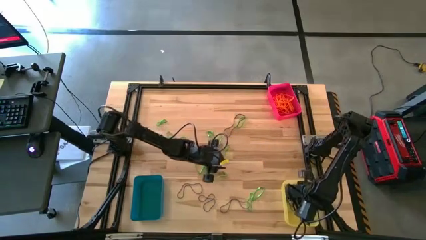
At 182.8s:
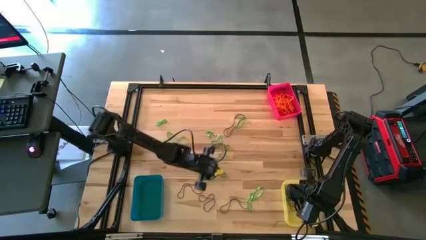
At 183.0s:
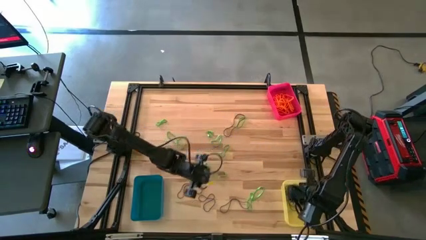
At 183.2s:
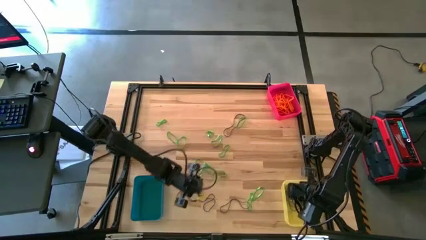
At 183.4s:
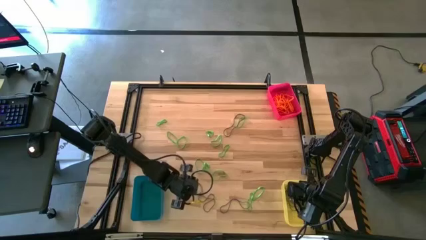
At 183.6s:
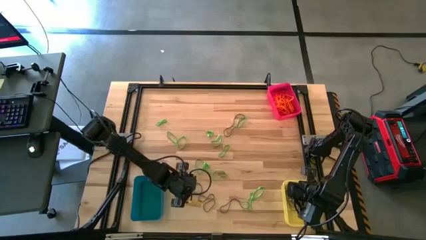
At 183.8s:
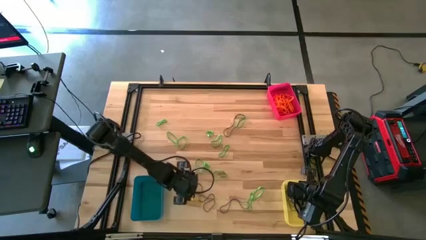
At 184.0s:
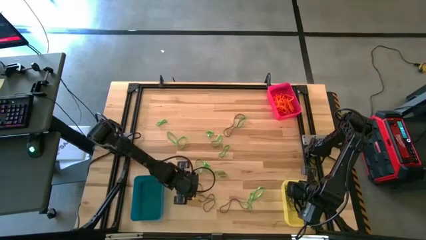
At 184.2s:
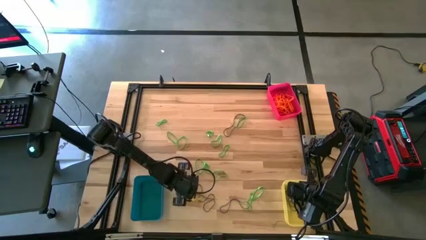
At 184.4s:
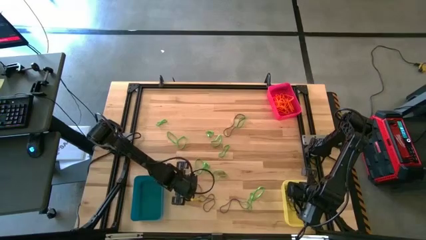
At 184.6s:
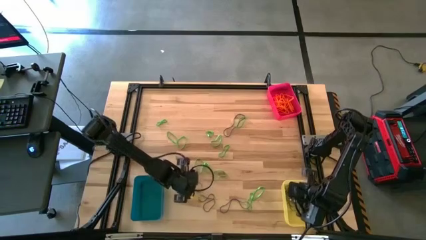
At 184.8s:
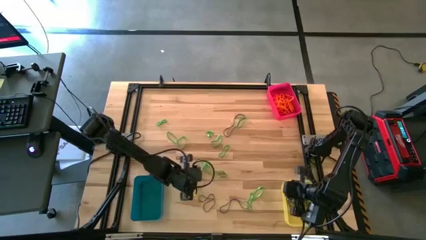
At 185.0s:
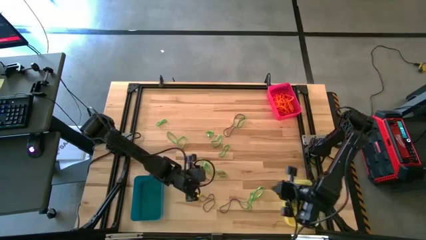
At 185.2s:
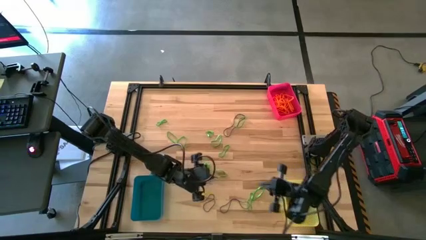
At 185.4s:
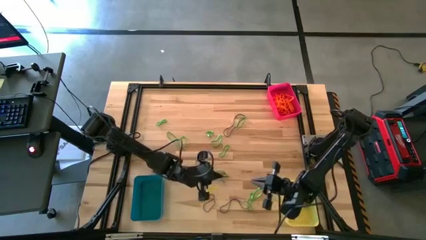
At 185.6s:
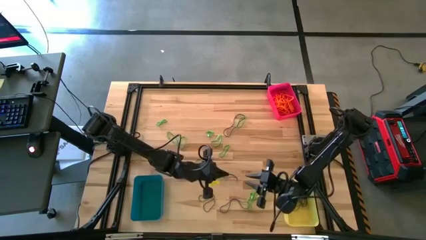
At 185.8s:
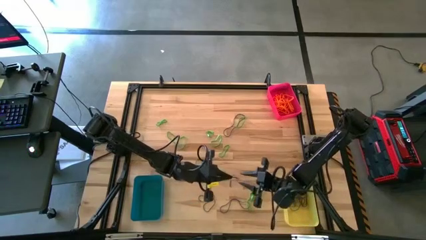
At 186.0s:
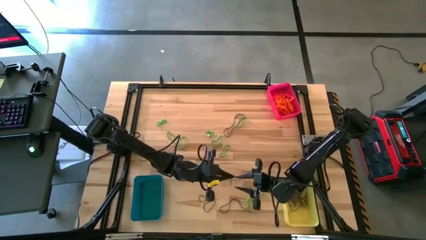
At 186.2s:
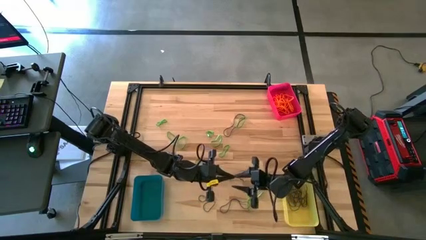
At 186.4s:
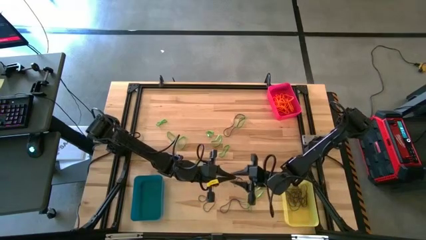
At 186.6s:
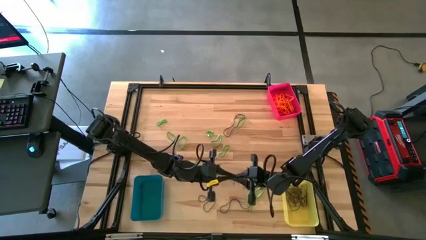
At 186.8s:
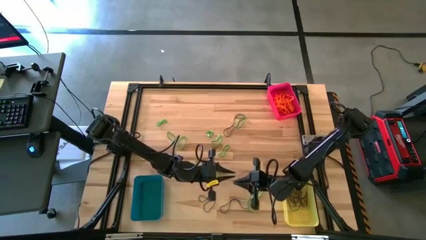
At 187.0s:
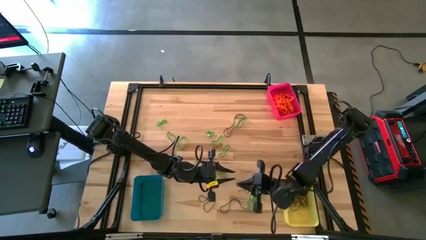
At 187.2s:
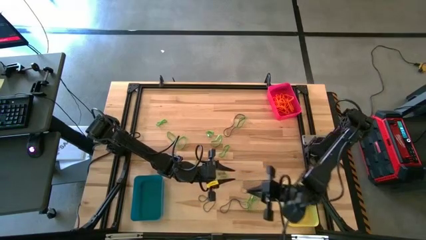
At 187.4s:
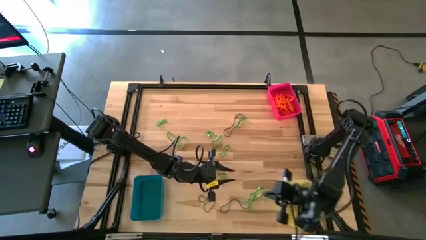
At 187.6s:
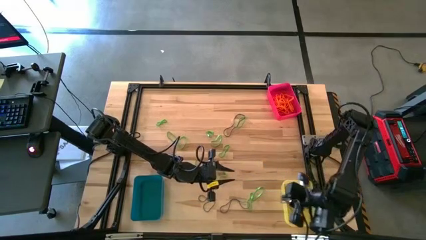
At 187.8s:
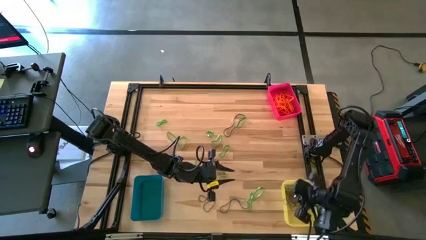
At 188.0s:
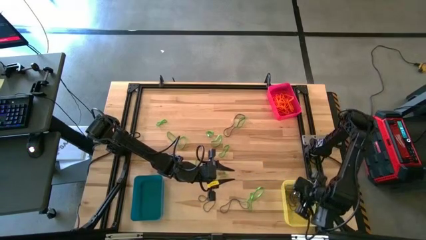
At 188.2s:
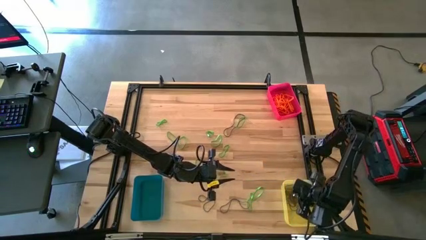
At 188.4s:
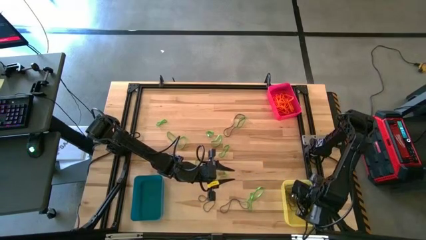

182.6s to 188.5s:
Task: Sort rubber bands into baskets
Put the purple rubber band into the yellow bin

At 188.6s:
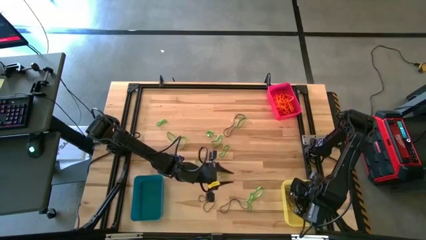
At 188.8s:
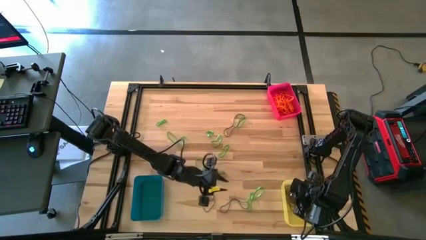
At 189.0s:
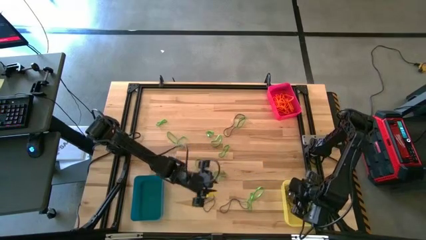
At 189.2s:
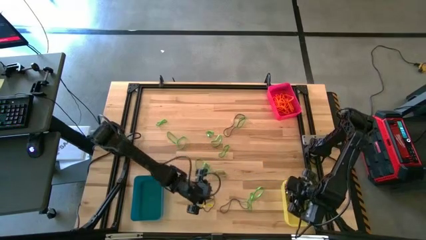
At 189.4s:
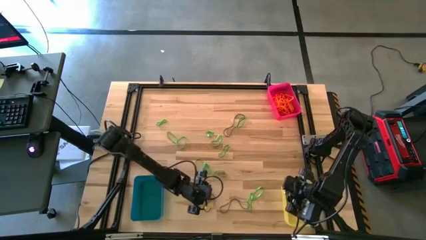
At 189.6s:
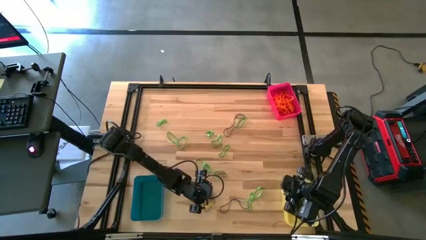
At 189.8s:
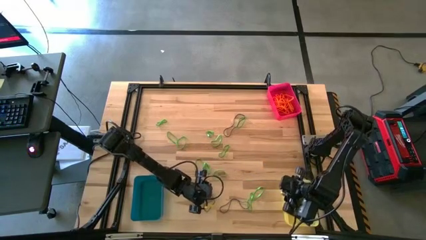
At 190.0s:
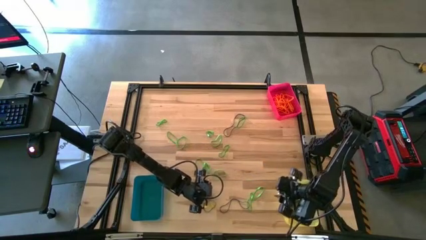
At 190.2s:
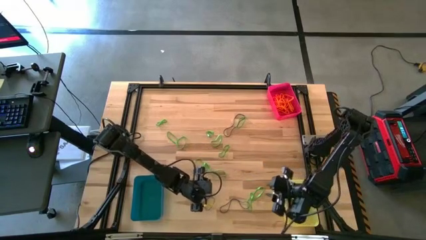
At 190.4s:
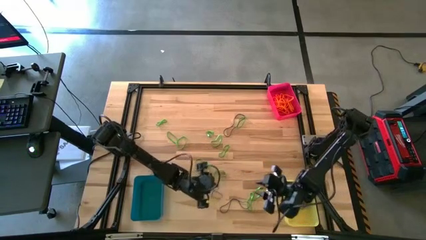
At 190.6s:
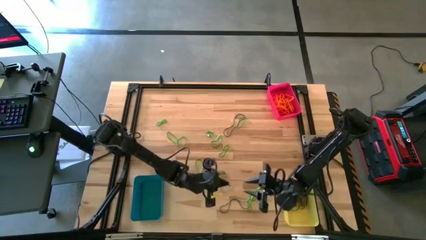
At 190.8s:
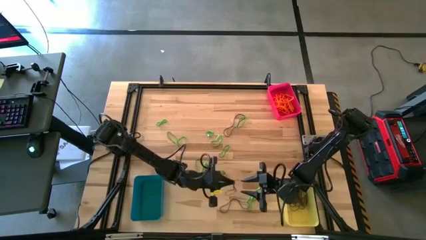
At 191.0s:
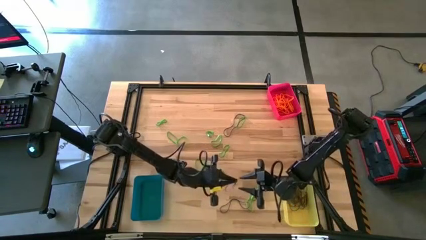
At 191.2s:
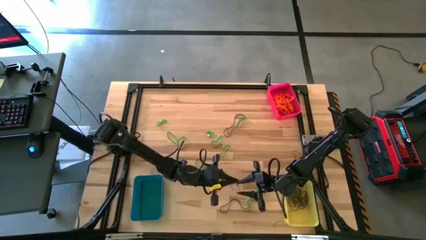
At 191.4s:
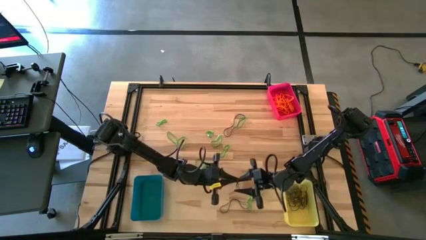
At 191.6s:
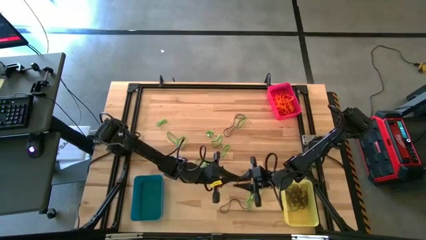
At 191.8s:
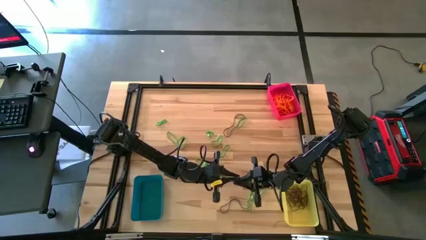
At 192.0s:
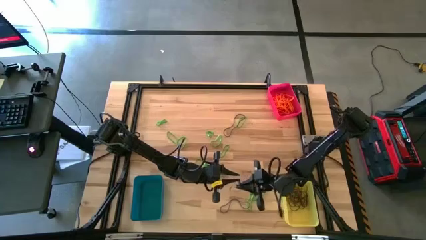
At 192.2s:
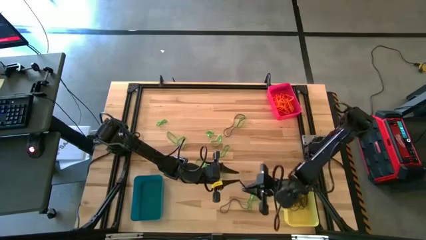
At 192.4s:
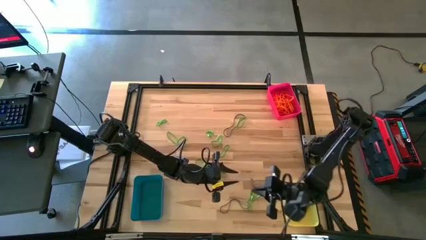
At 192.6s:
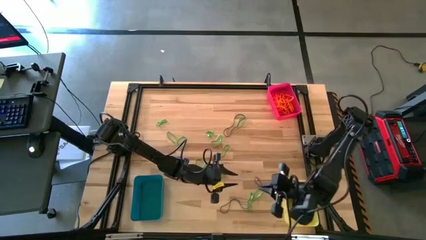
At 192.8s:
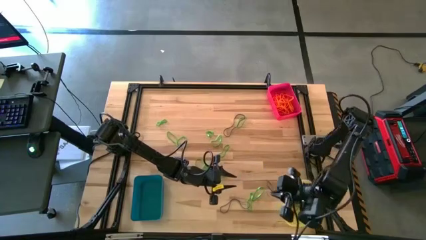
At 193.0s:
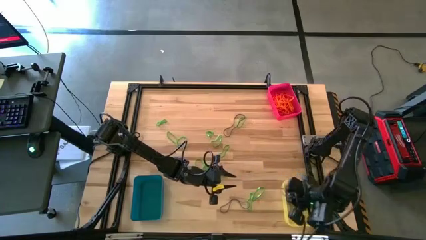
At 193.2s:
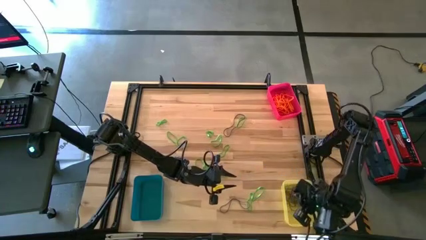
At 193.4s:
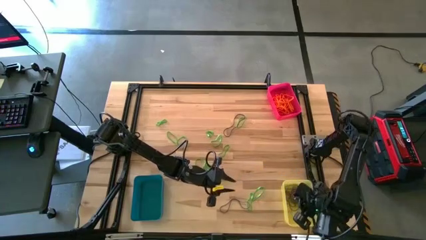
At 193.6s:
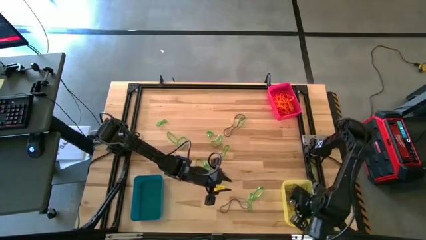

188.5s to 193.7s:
Put the purple rubber band into the yellow bin

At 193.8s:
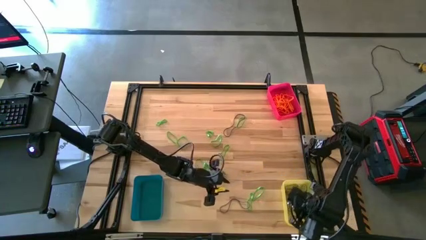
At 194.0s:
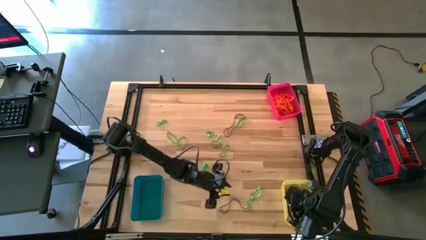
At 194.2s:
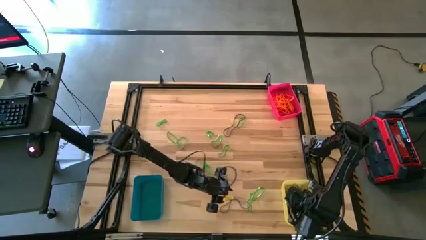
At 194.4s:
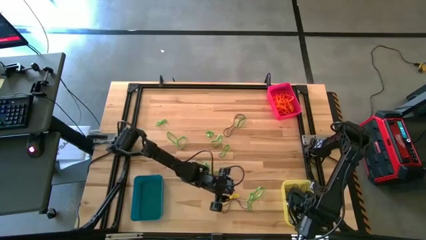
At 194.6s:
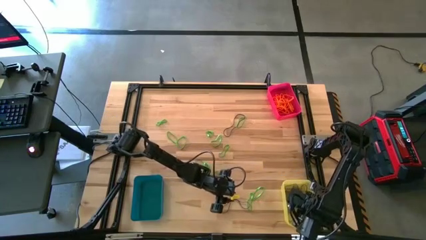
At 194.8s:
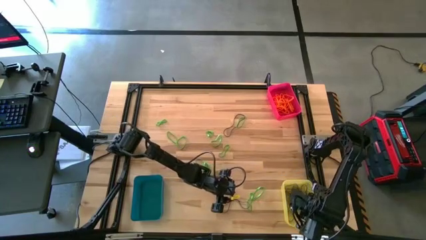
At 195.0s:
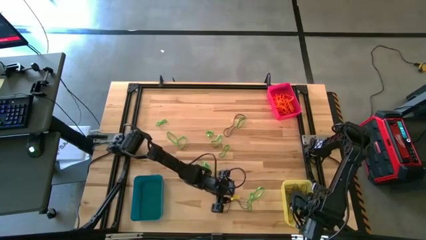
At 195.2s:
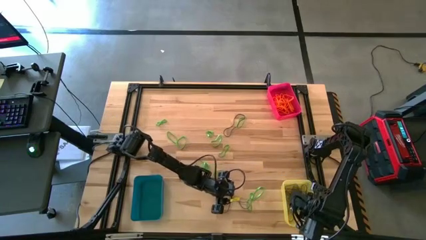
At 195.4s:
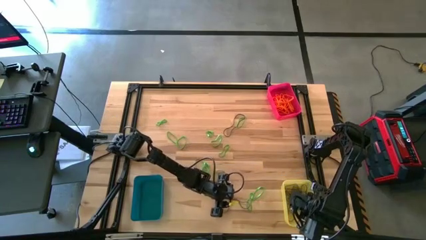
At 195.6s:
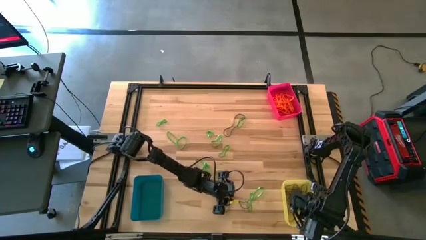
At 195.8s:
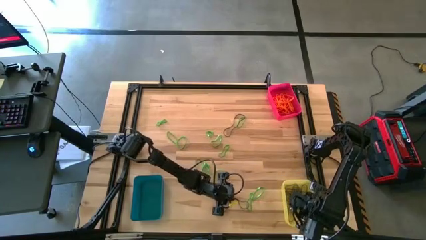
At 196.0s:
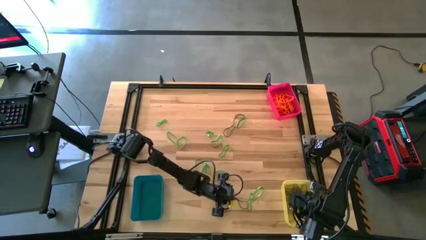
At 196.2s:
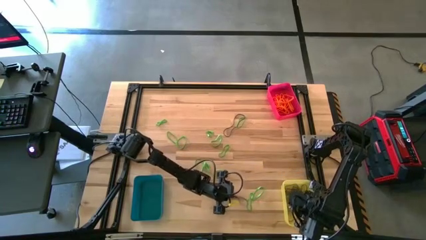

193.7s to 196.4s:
Put the purple rubber band into the yellow bin

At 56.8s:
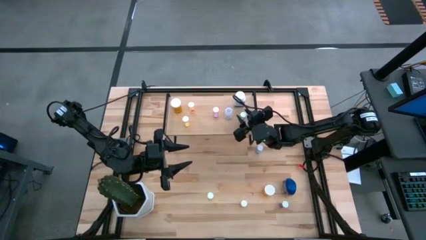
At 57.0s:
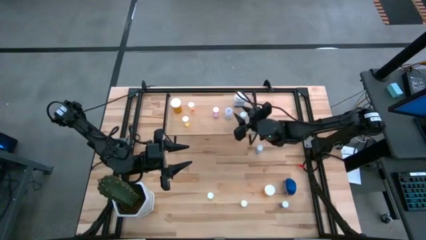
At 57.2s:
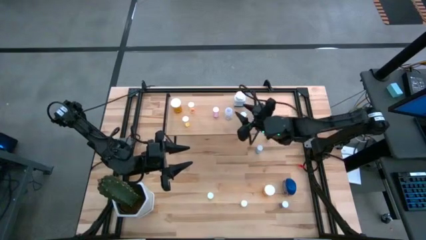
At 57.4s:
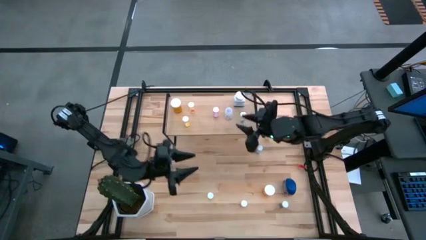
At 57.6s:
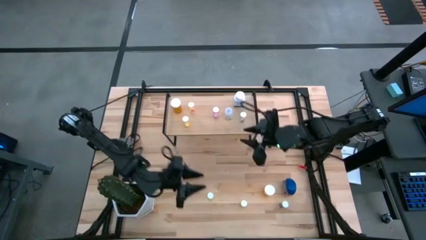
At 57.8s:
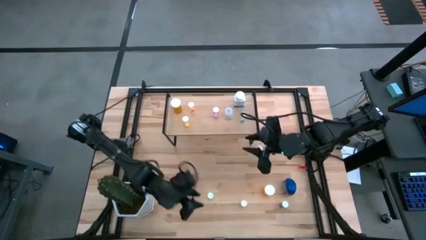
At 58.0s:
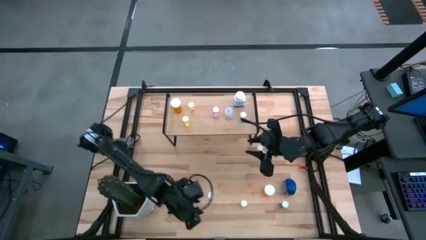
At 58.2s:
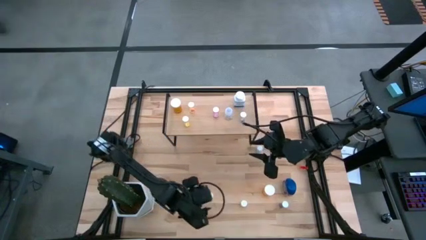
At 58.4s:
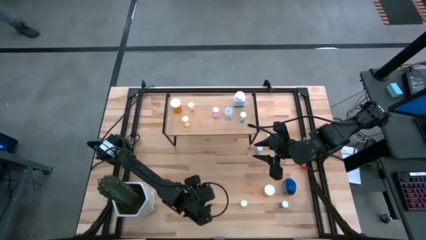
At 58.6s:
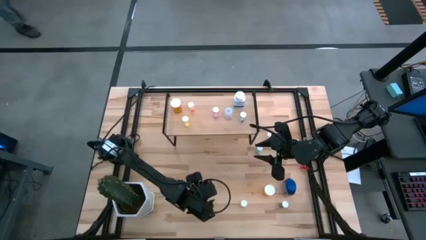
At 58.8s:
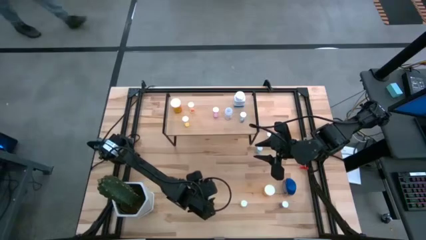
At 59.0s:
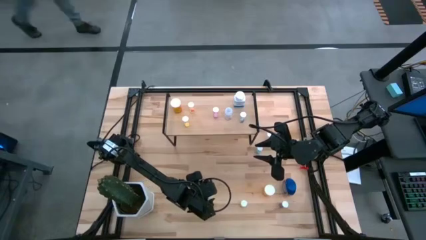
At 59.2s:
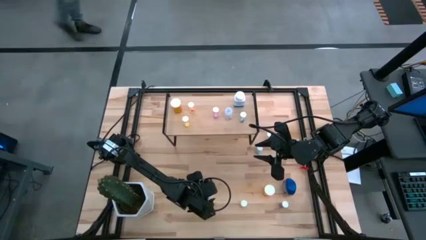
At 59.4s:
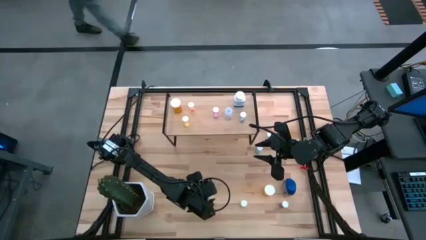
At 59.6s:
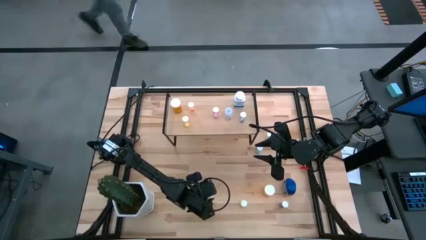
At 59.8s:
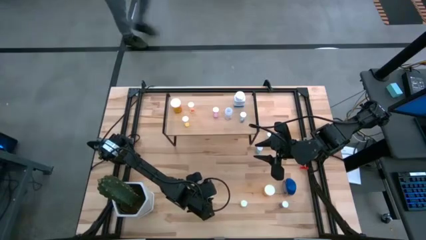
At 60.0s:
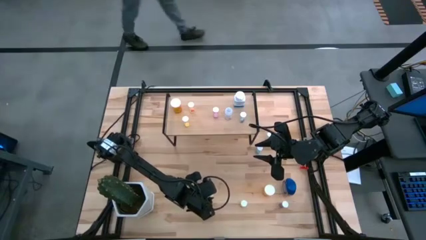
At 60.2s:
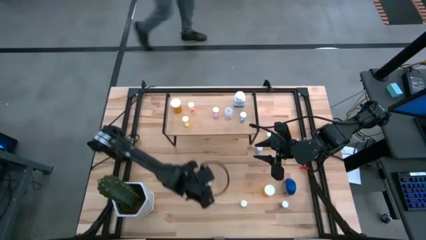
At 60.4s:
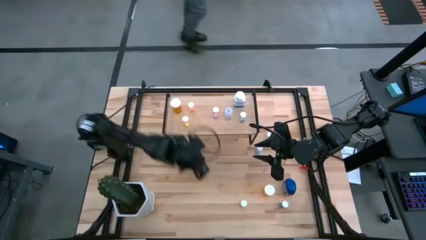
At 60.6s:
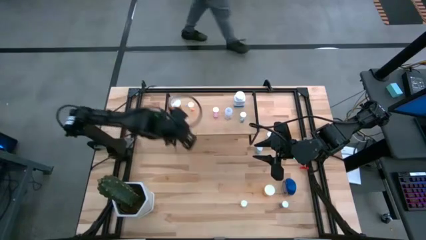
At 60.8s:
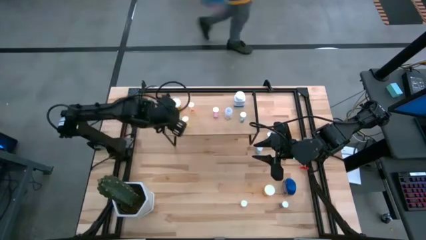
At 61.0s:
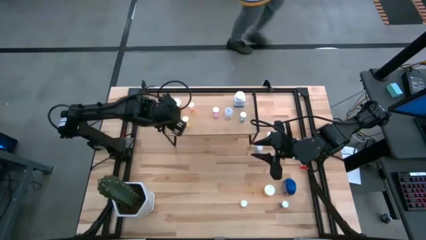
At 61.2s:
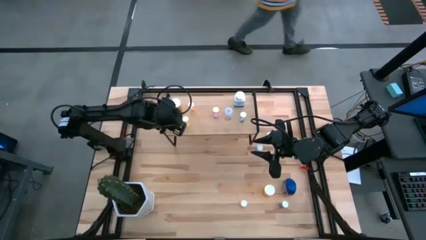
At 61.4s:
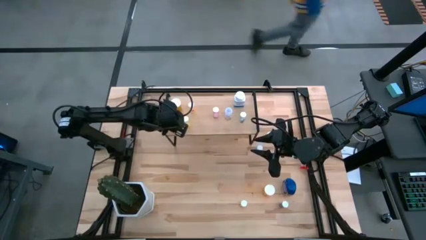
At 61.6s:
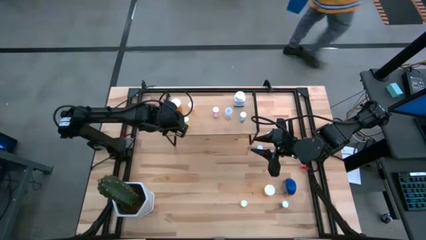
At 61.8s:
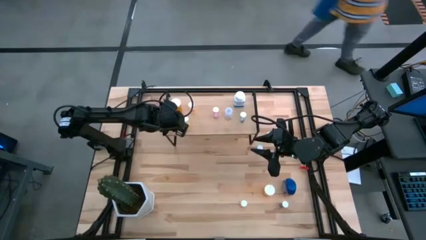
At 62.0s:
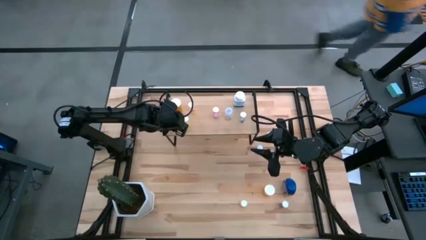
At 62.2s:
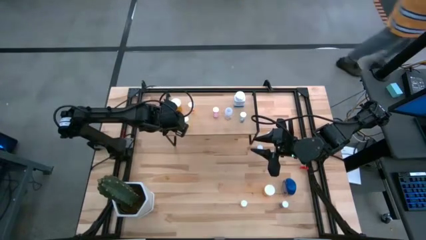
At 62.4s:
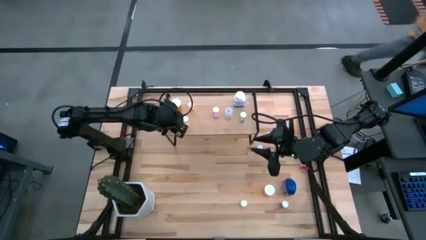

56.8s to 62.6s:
Task: Pick and place medicine bottles onto shelf by color
Put the yellow pill bottle on the shelf
